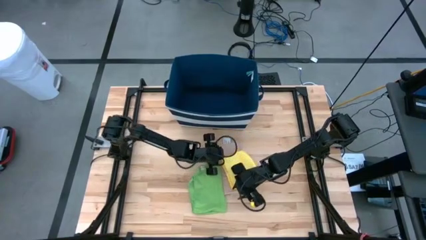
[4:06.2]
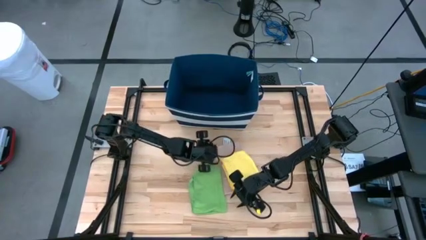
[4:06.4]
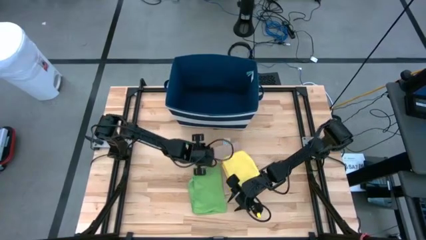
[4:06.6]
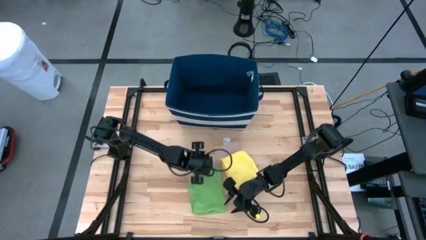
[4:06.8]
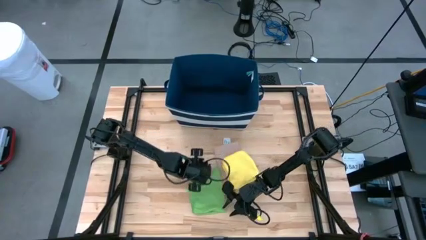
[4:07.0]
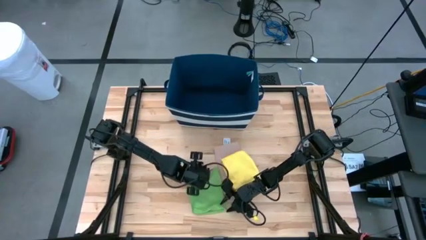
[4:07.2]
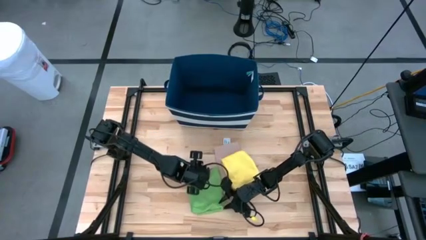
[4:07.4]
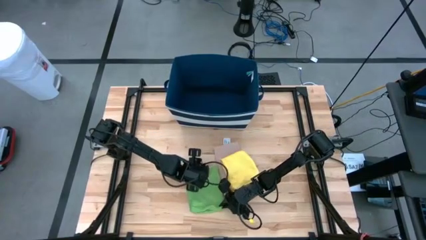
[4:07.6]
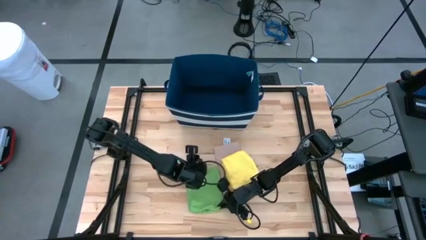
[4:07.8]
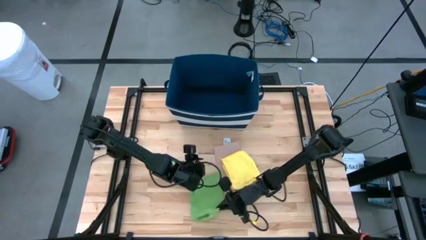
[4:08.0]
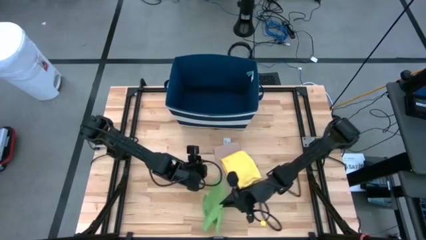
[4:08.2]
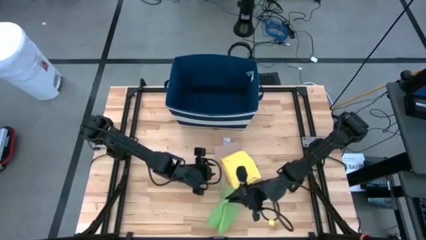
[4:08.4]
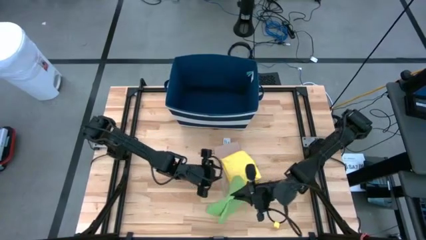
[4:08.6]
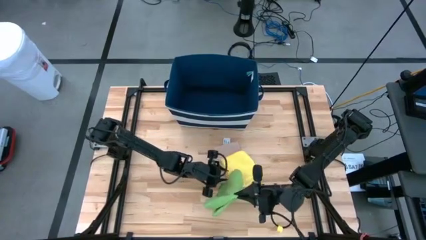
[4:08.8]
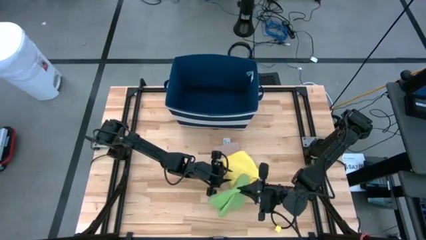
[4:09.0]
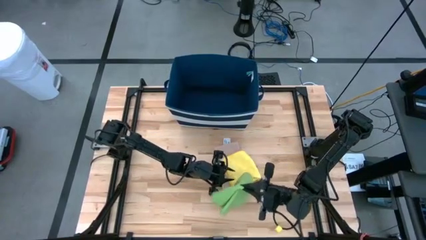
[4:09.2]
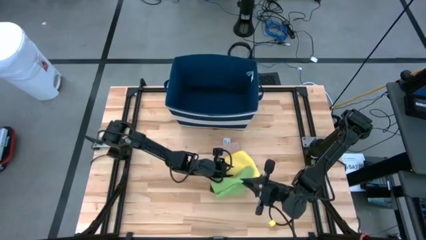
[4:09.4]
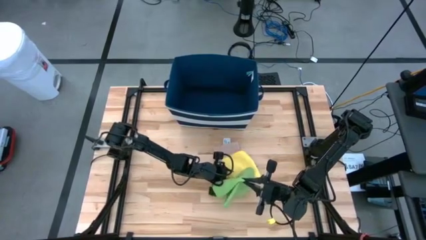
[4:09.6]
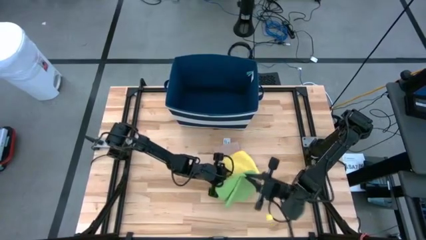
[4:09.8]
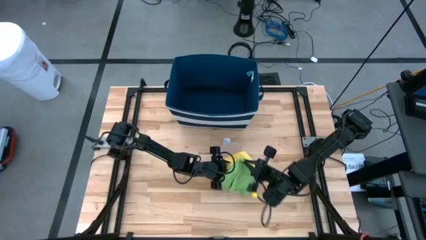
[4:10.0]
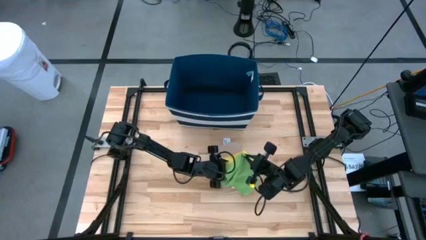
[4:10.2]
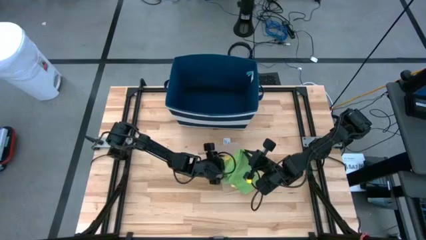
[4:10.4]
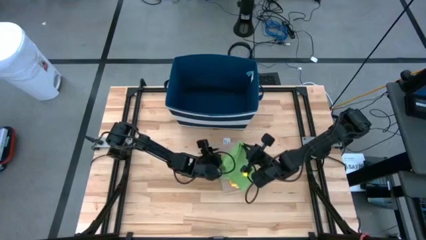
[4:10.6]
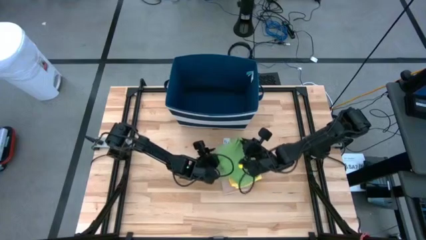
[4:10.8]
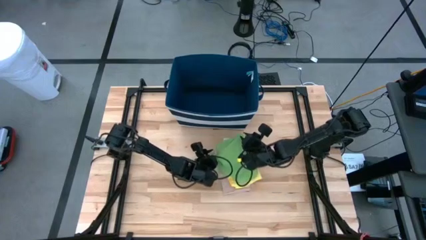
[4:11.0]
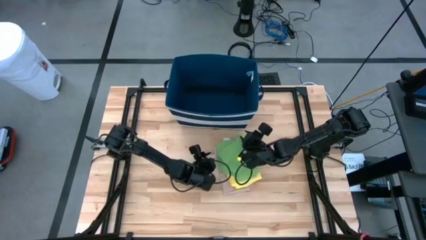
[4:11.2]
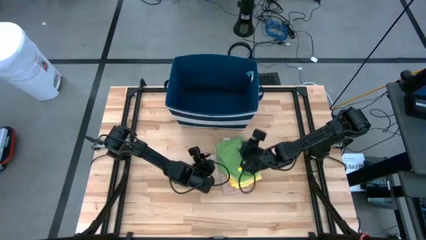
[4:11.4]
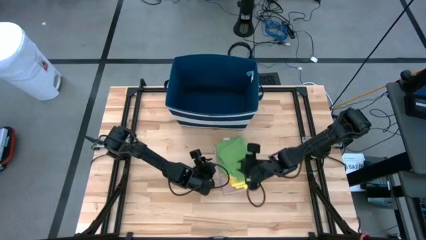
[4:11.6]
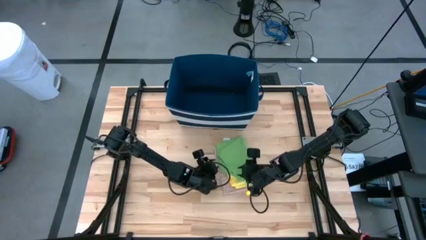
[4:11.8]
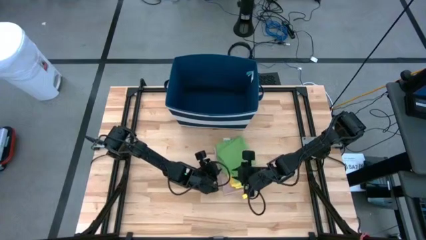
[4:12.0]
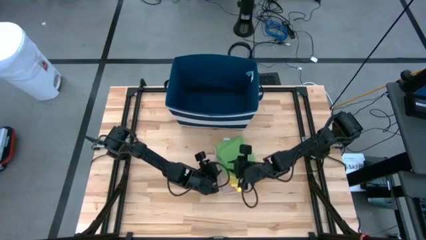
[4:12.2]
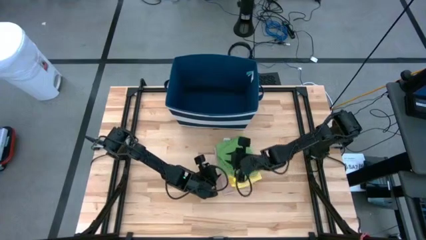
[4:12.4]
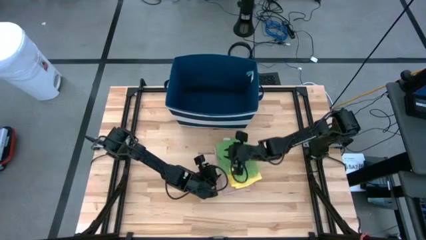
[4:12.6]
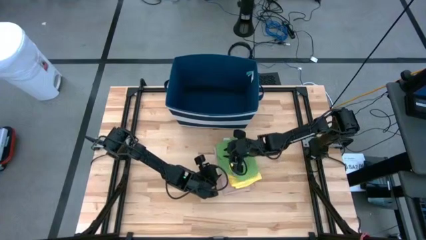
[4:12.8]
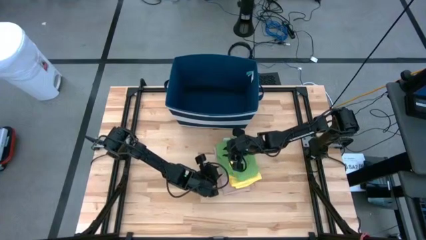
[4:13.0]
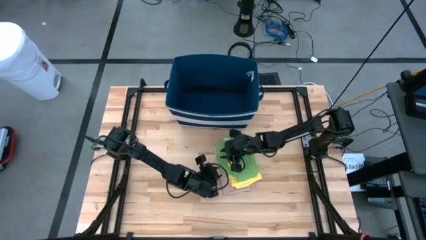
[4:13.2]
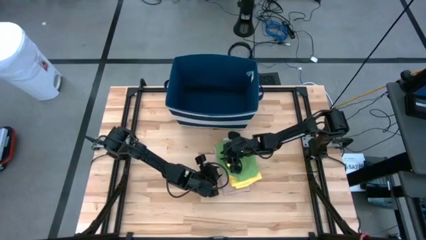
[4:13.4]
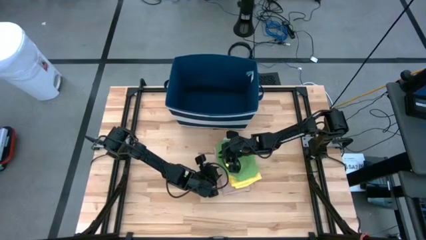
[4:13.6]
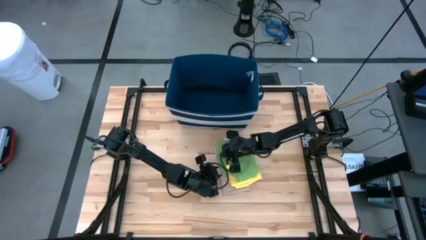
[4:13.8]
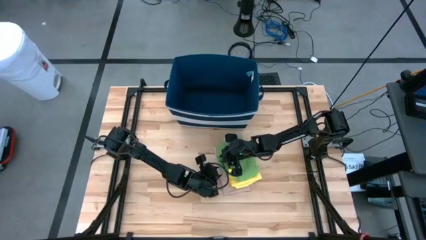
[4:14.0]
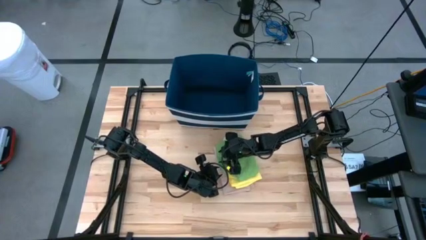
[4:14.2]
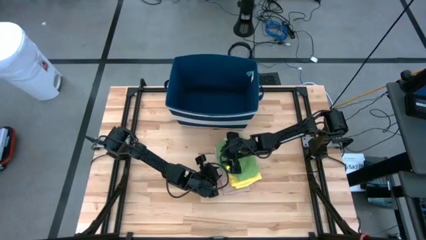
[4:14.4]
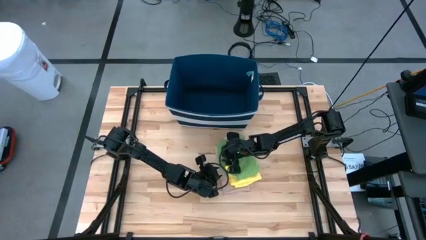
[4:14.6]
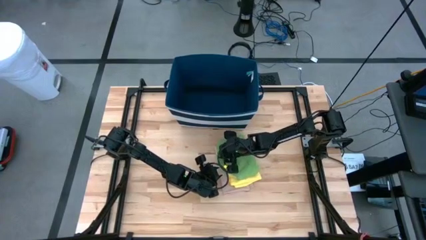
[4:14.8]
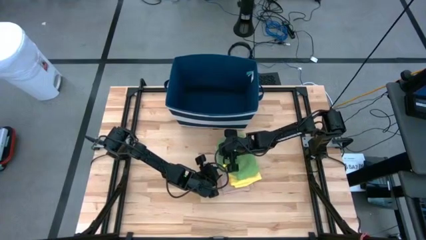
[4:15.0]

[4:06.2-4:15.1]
Task: Fold towel
Stack the green towel on top of the yellow towel

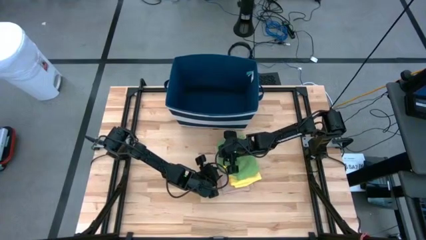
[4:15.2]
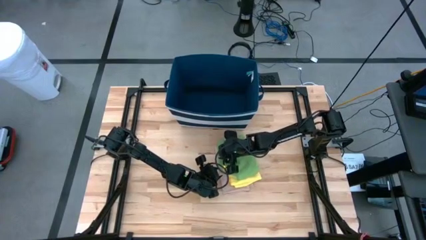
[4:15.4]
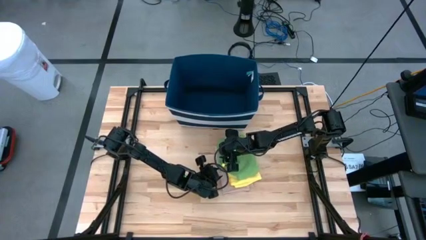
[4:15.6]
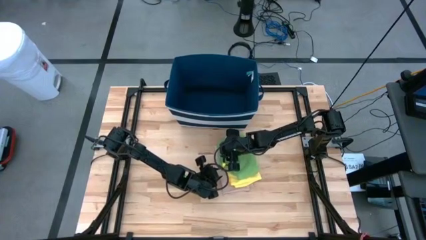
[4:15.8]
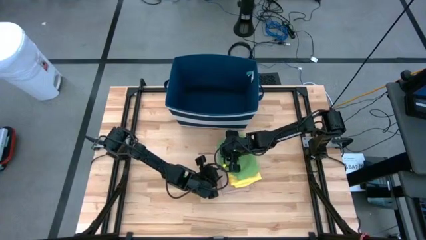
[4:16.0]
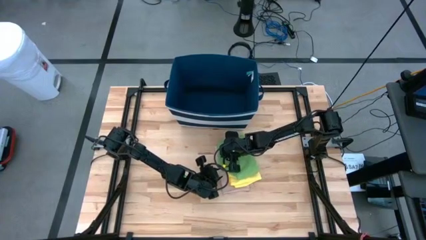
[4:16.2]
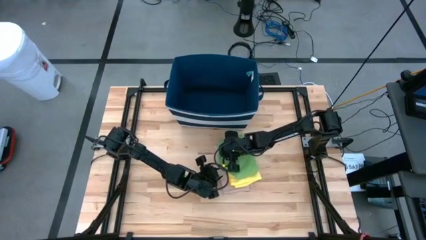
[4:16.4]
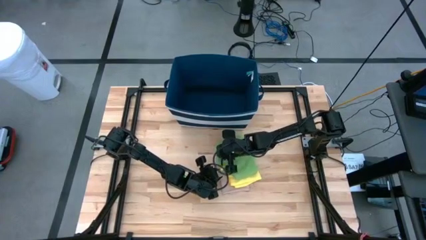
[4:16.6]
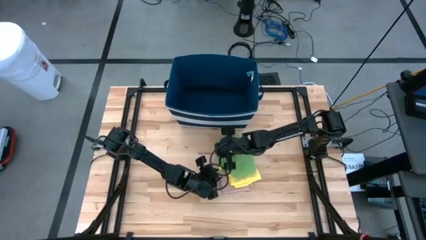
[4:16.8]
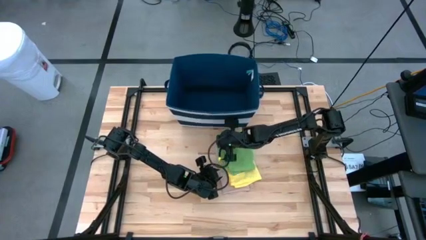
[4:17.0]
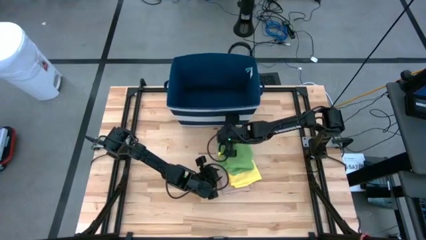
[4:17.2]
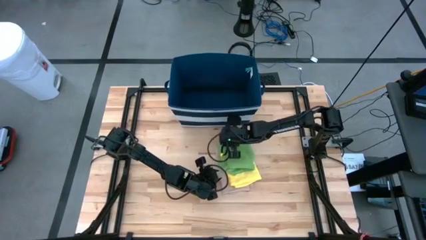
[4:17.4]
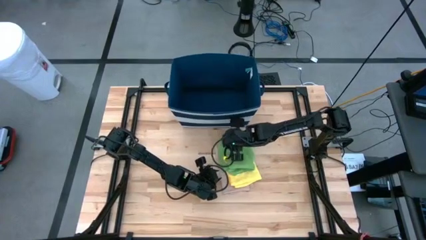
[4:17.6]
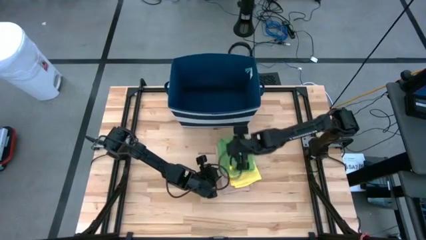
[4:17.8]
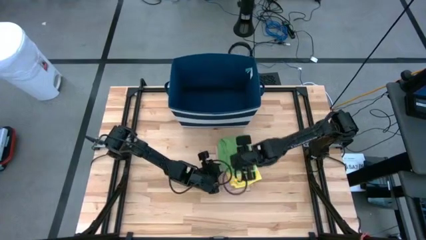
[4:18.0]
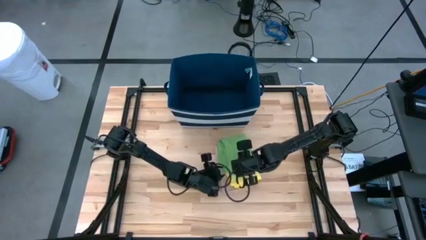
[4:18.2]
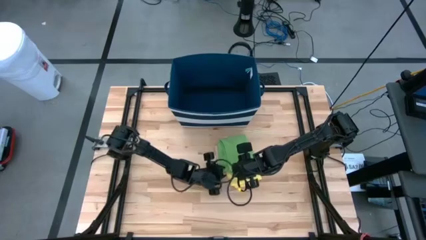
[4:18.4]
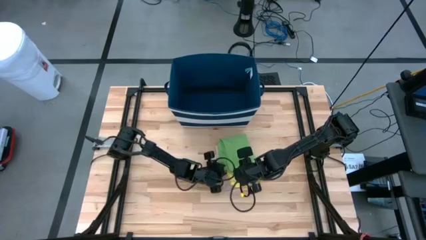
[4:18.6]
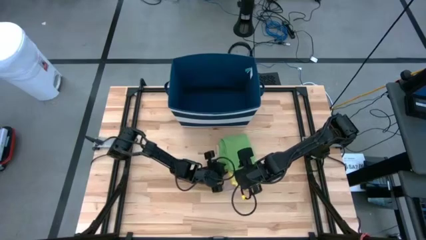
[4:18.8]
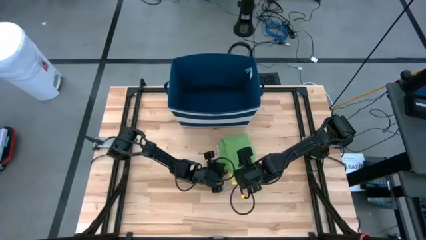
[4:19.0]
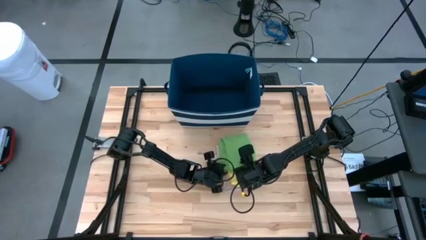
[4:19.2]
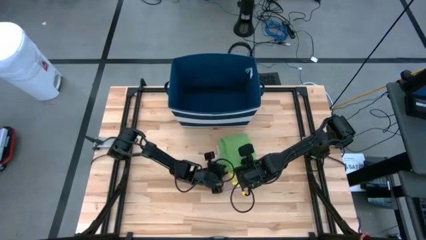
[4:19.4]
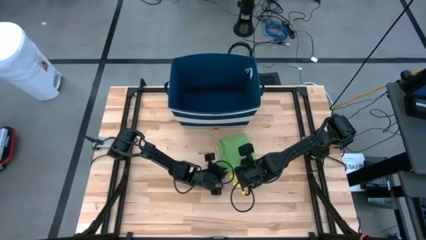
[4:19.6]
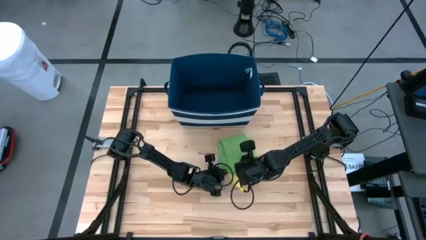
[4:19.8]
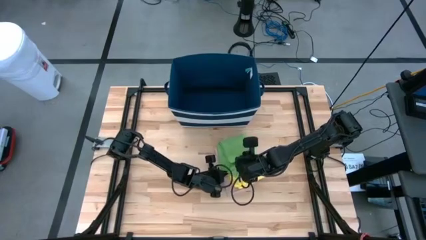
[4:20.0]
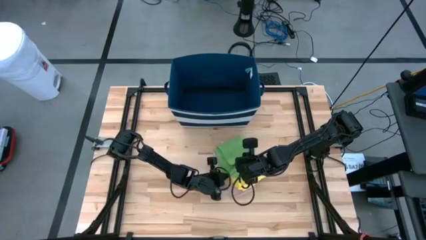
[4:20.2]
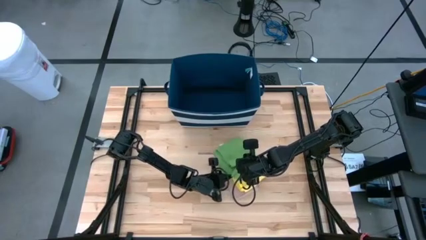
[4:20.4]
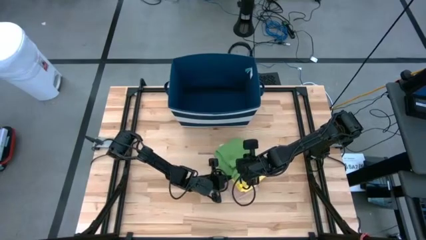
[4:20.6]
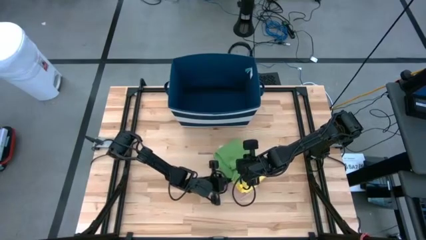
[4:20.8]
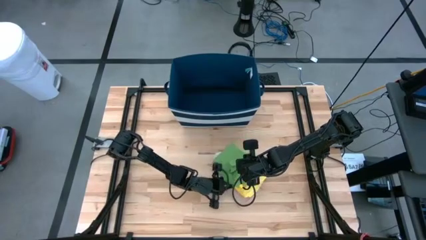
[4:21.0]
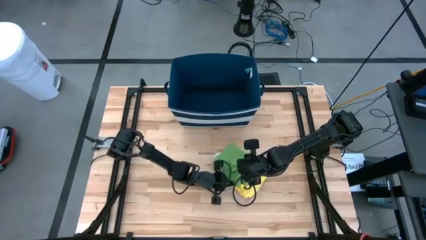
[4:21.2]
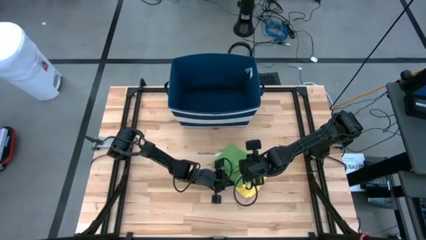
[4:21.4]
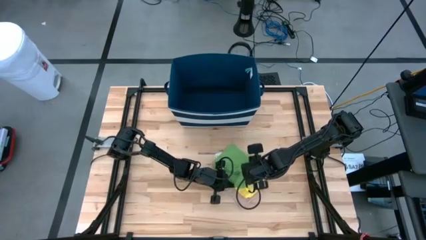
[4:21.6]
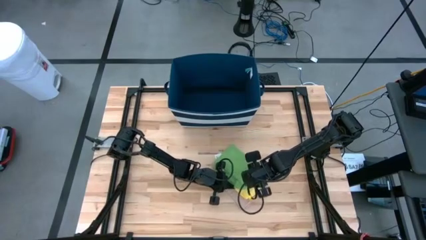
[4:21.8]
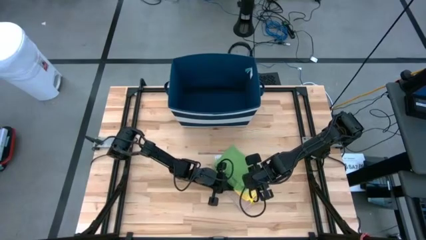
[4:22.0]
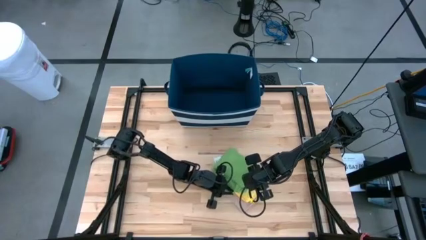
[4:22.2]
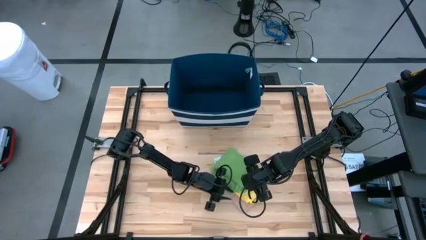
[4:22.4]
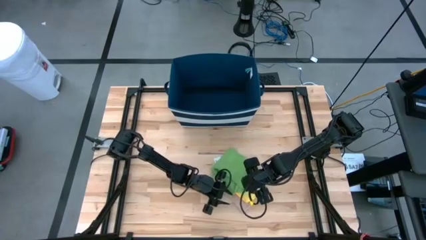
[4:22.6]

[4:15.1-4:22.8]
Stack the green towel on top of the yellow towel
